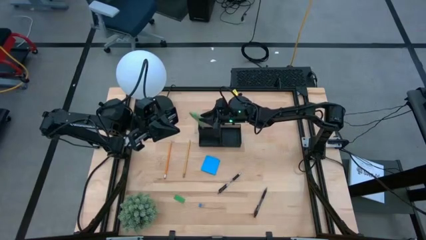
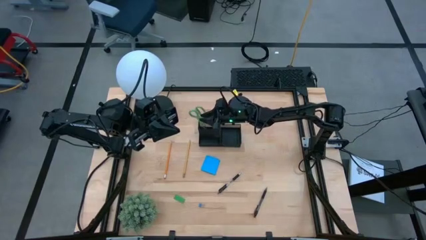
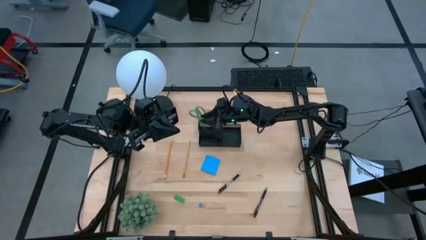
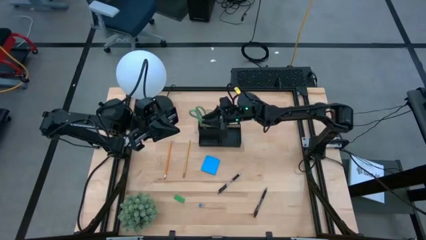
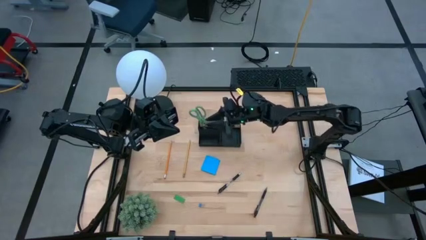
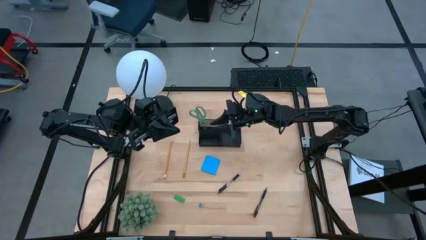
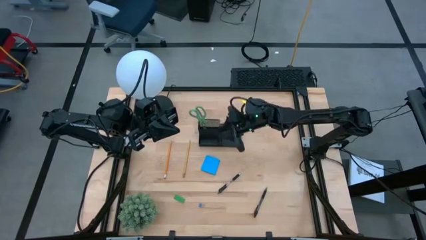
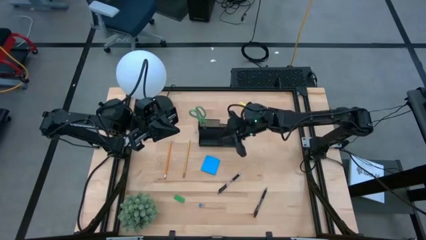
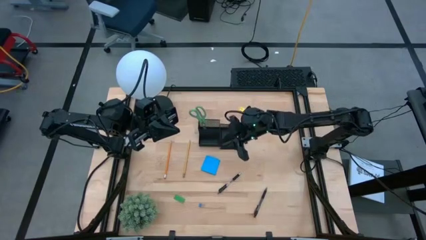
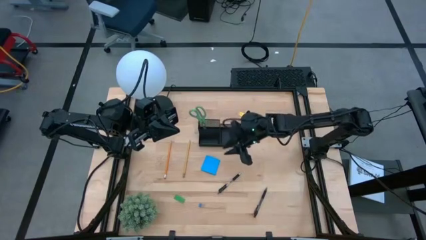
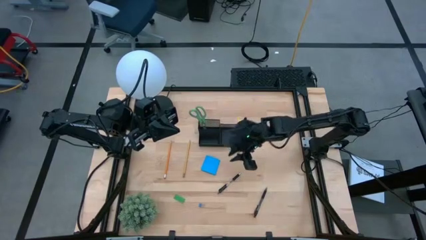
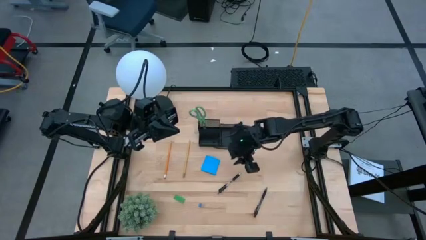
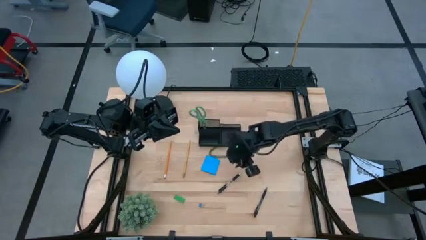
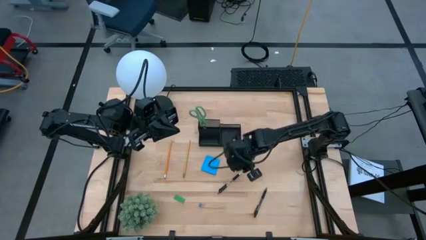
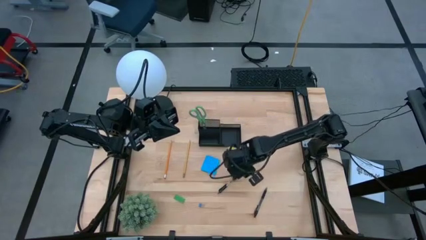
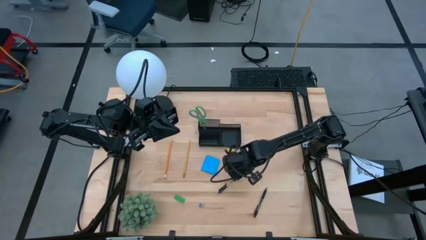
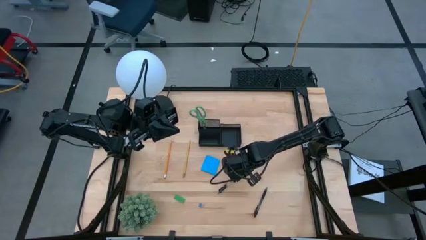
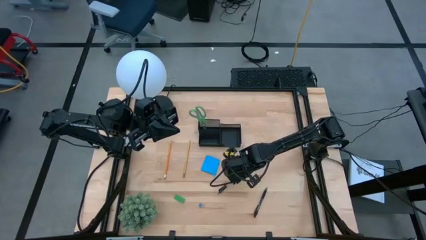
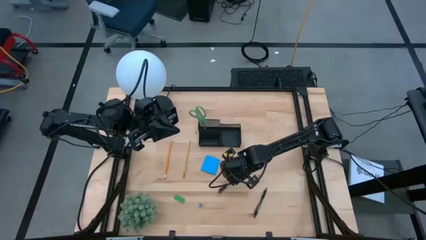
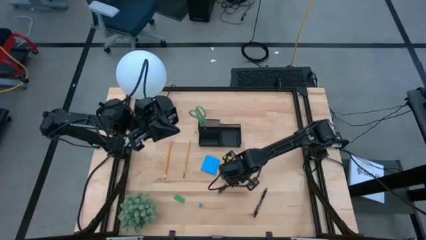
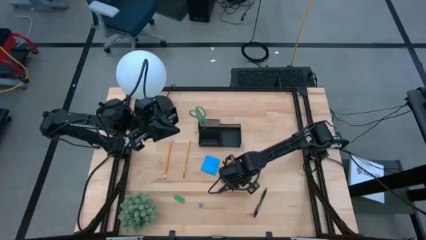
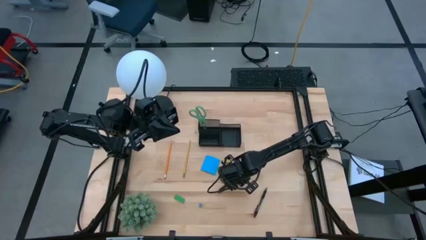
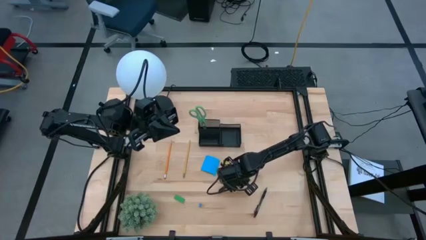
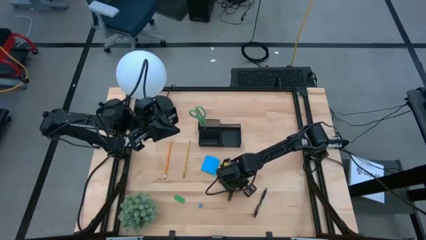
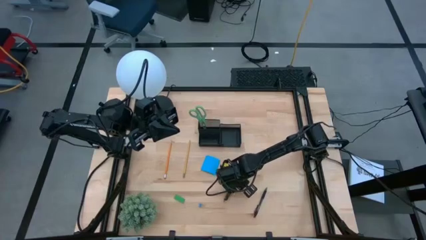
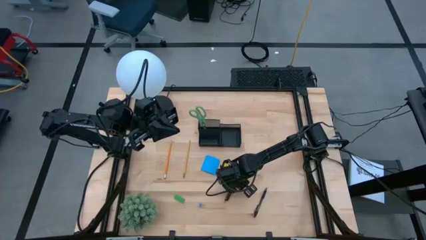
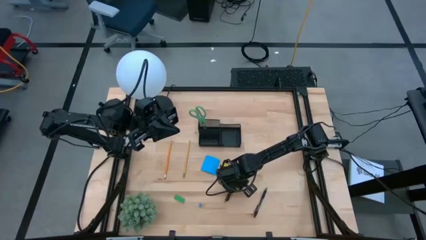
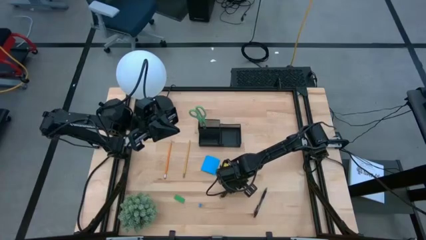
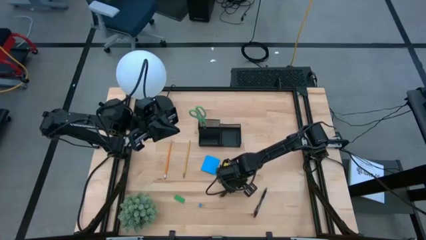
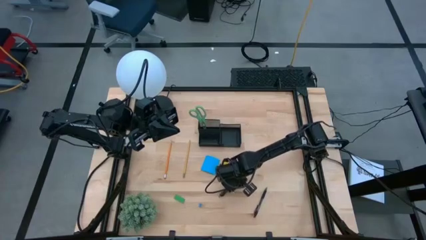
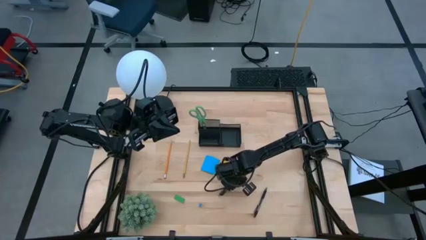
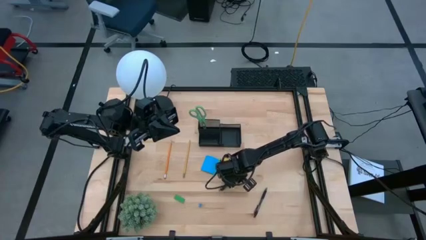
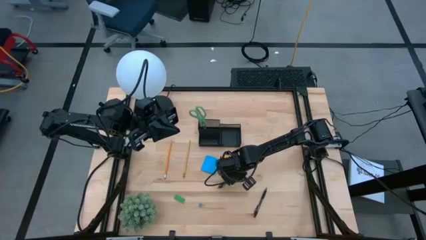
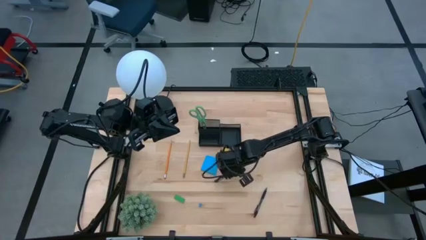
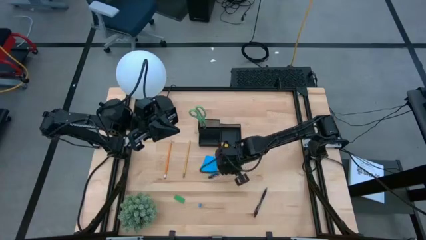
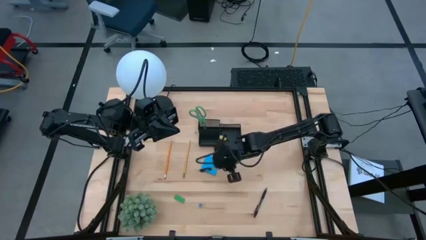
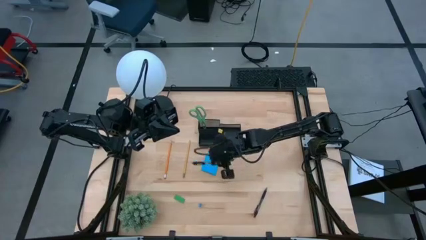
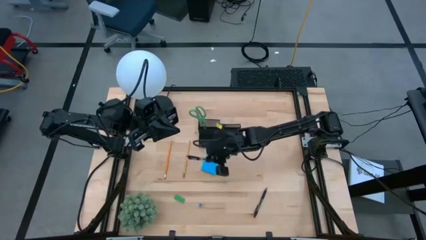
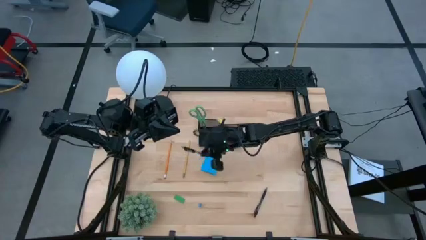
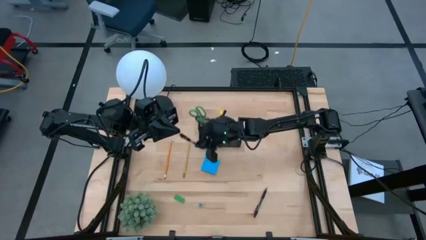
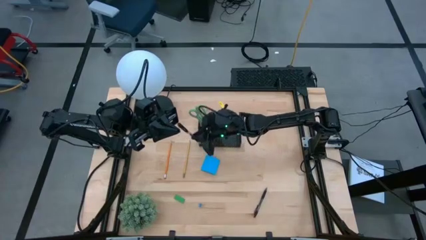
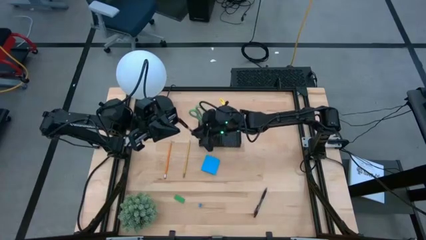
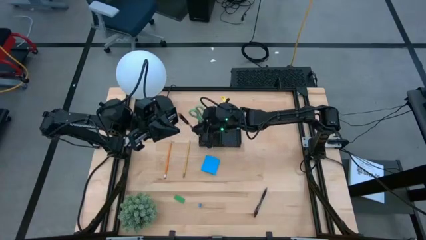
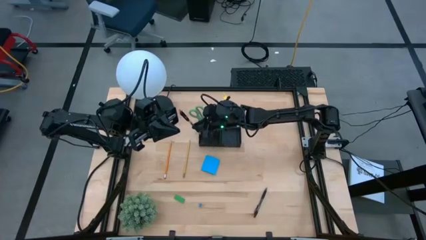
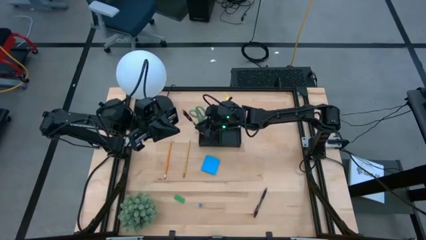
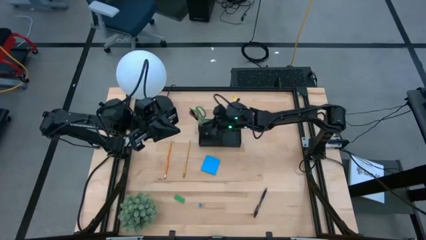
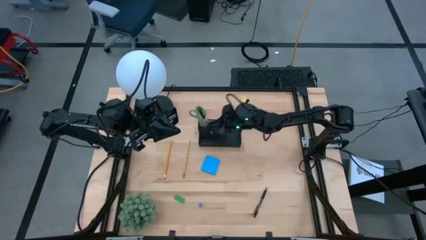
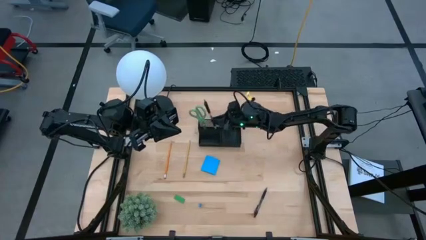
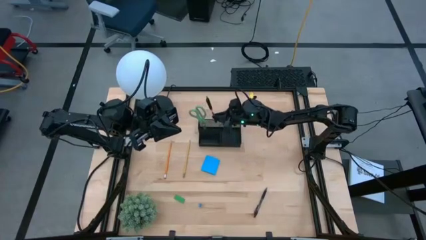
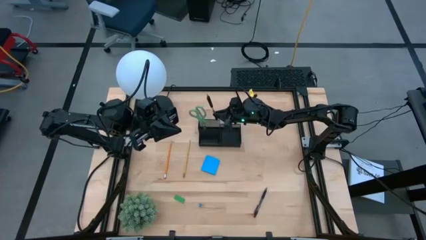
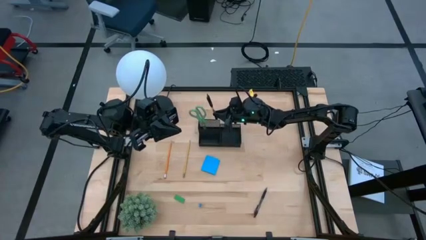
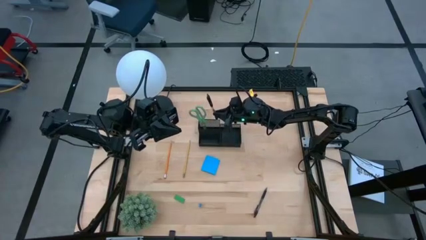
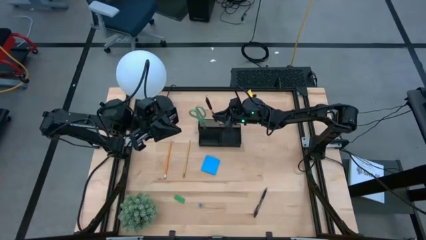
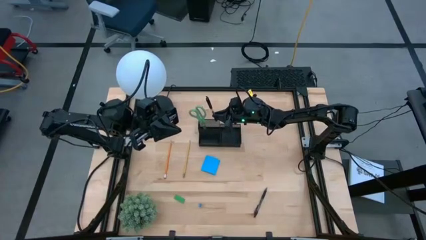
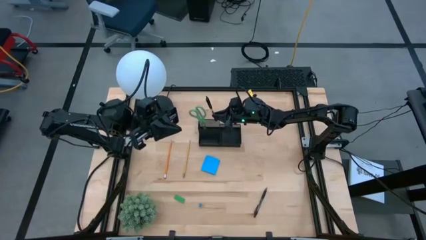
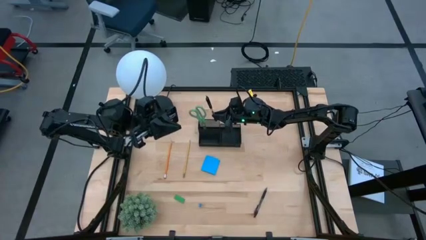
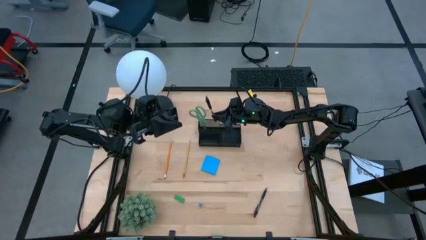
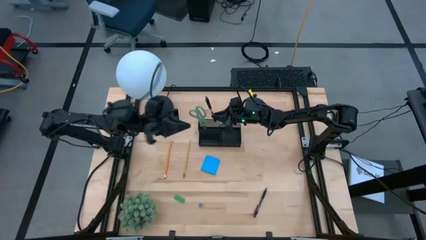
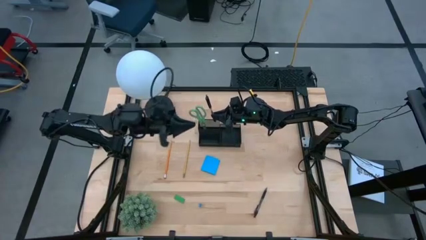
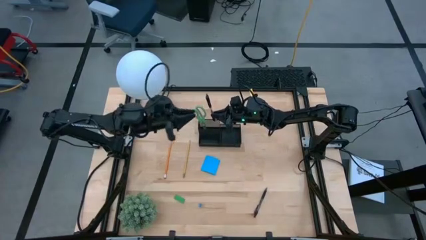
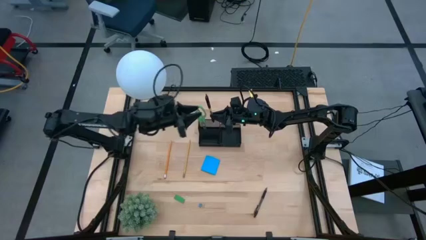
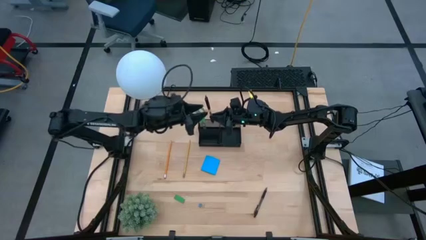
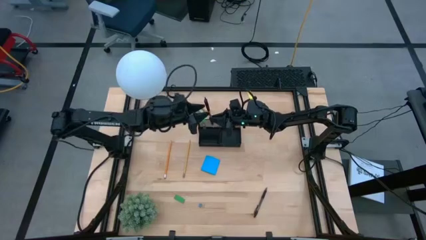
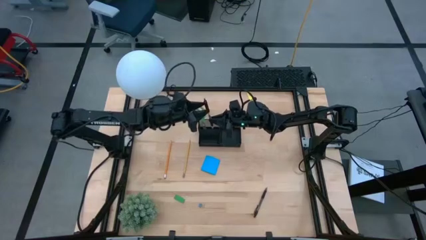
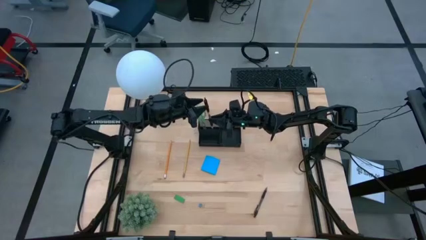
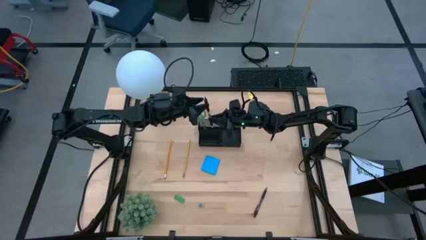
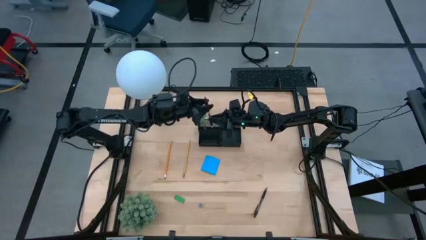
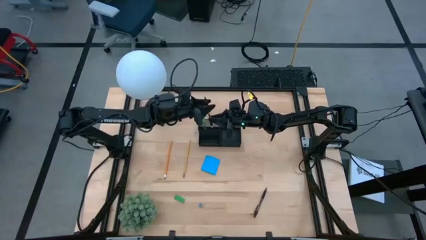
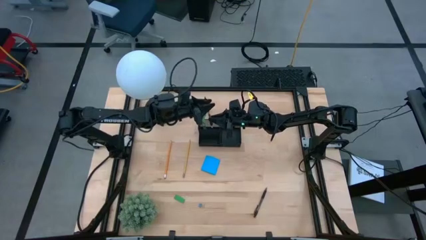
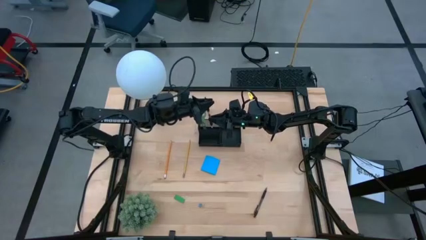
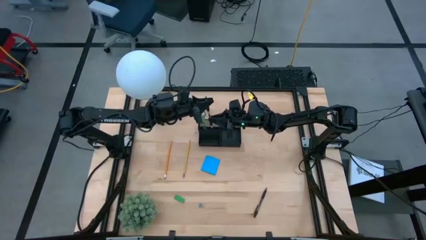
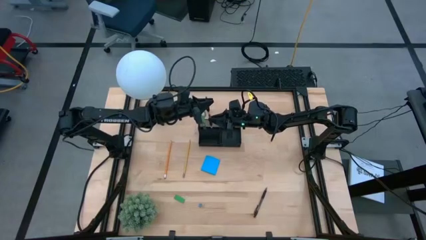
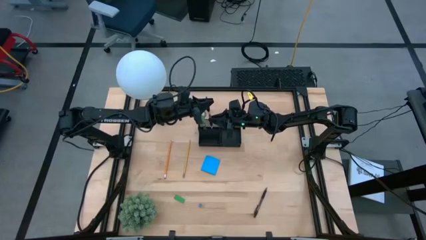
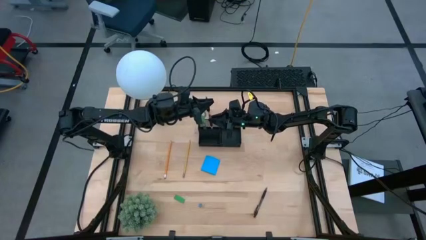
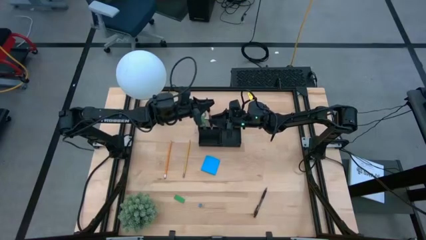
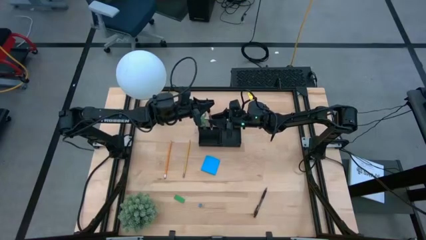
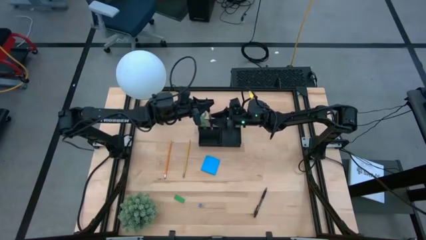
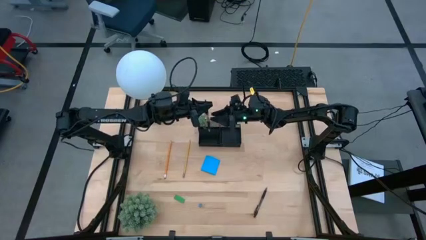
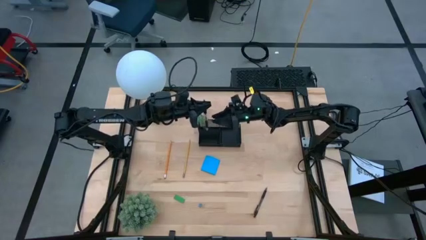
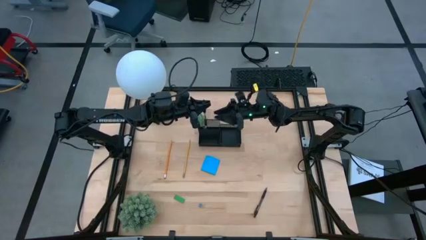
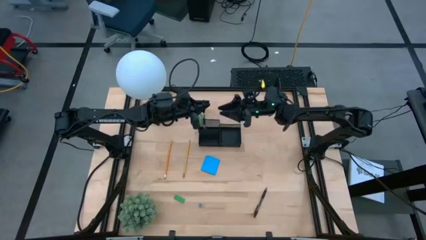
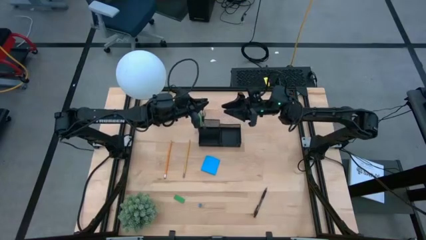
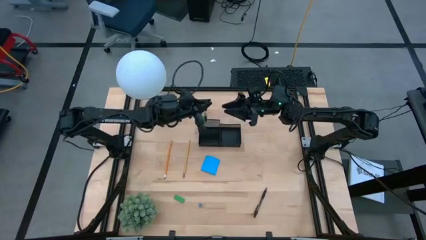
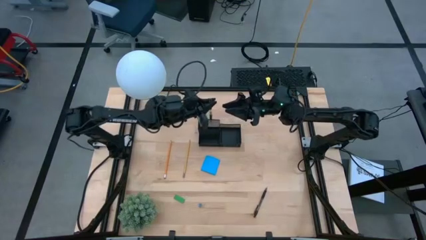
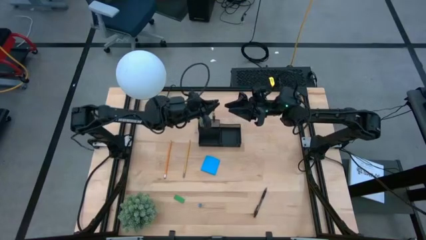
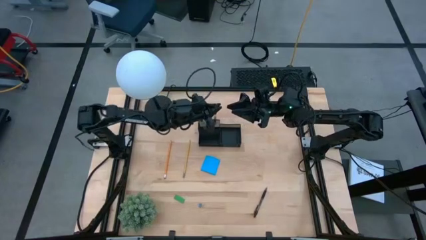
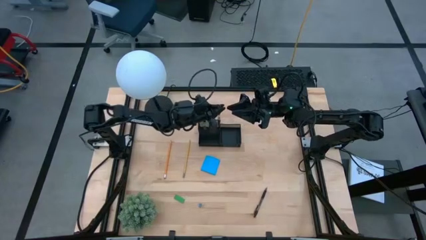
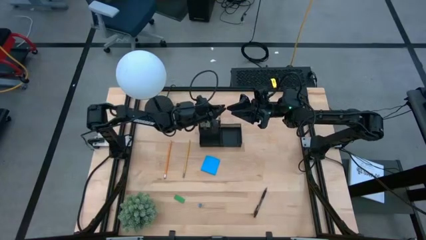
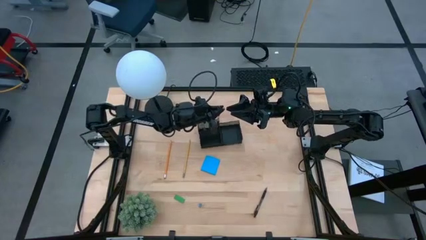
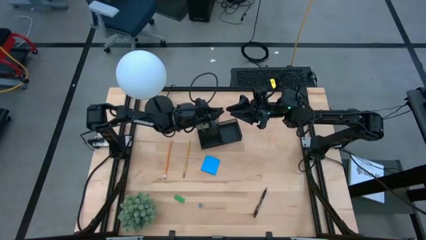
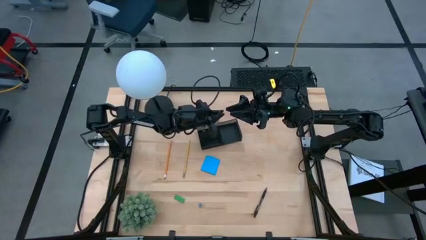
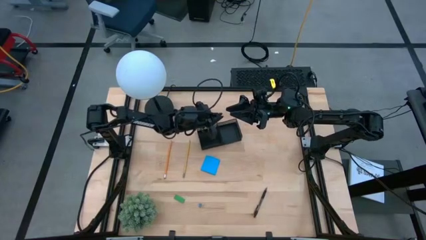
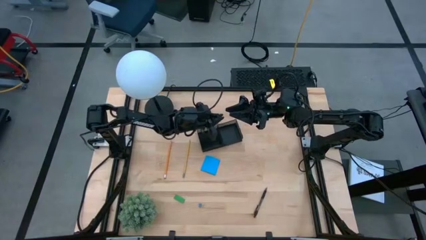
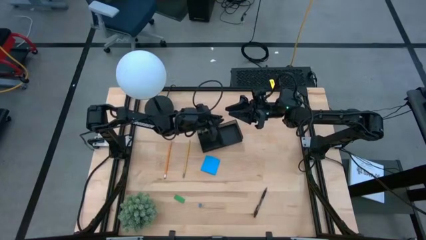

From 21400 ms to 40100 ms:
Task: Pick and place office supplies into organizer
Put the top black pen into the black desk organizer
